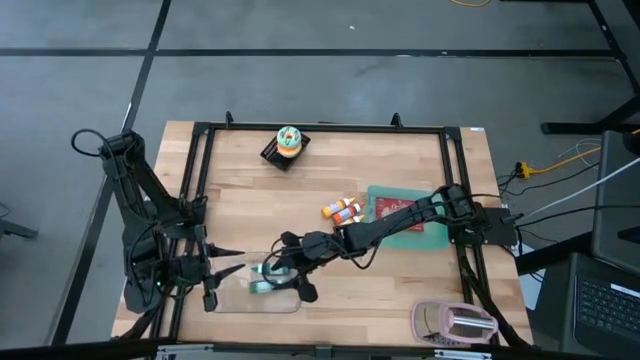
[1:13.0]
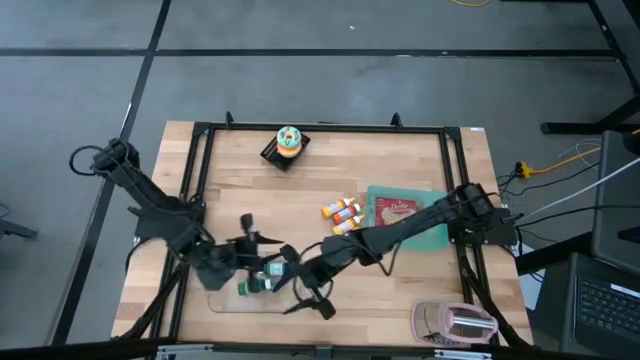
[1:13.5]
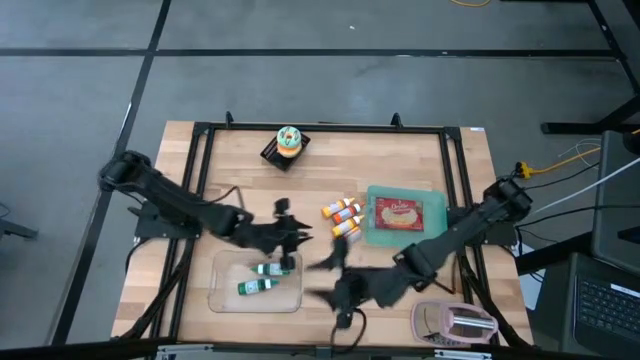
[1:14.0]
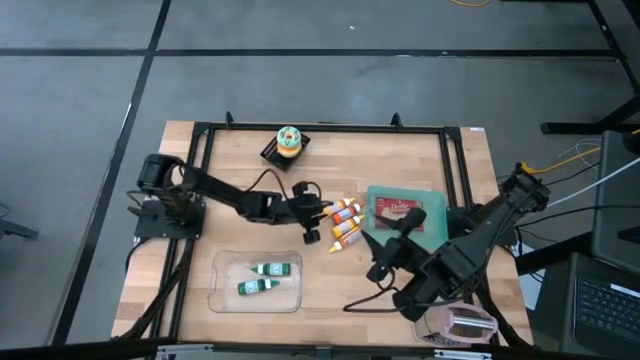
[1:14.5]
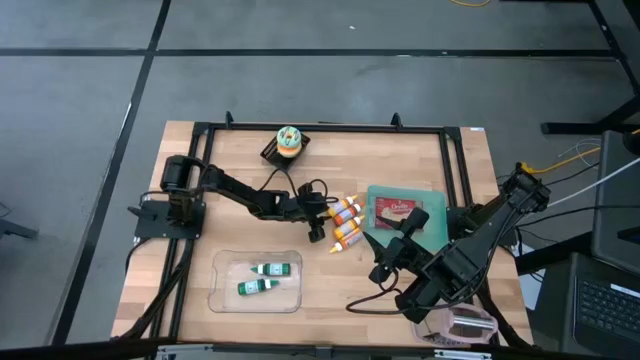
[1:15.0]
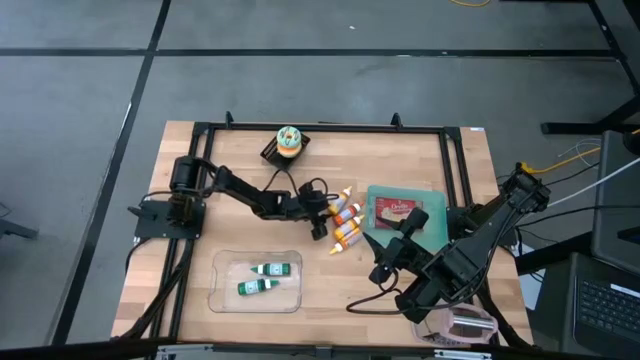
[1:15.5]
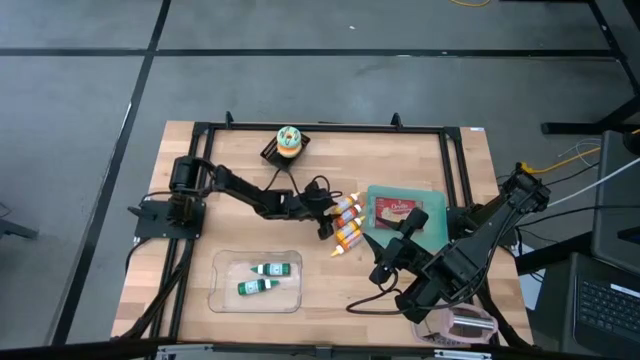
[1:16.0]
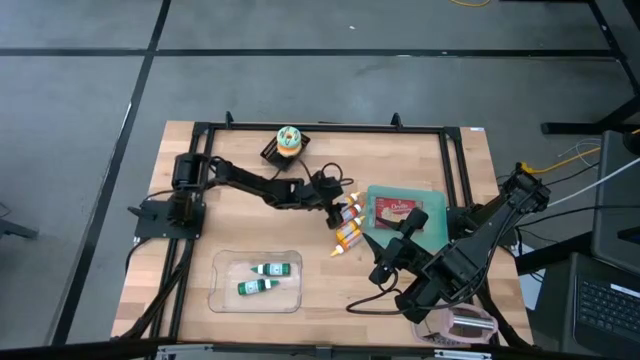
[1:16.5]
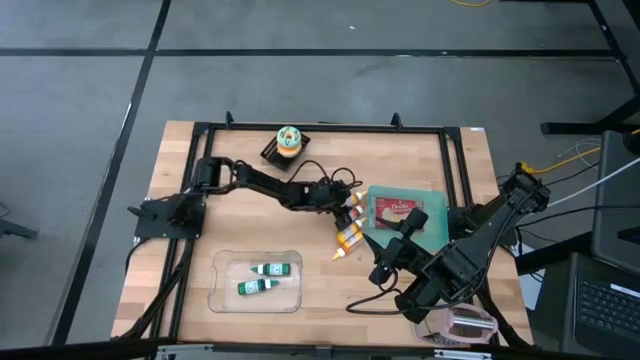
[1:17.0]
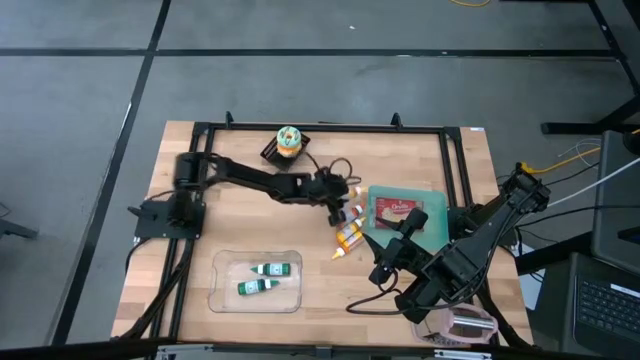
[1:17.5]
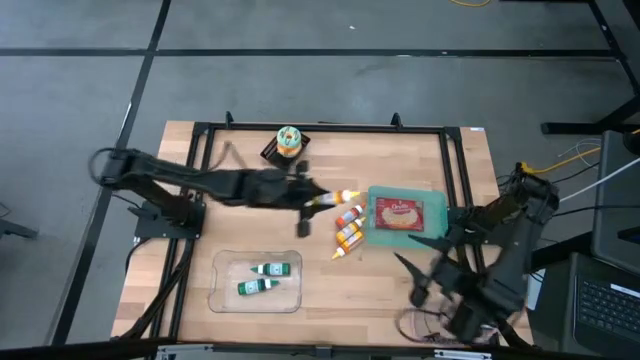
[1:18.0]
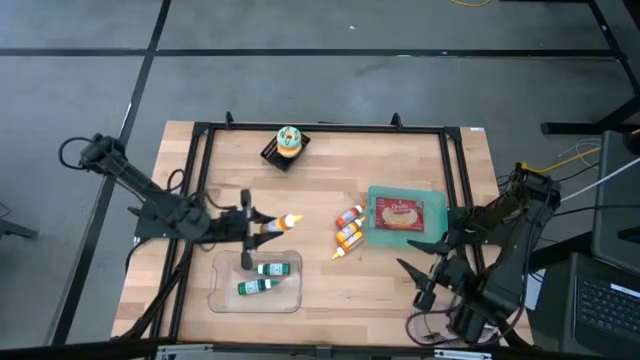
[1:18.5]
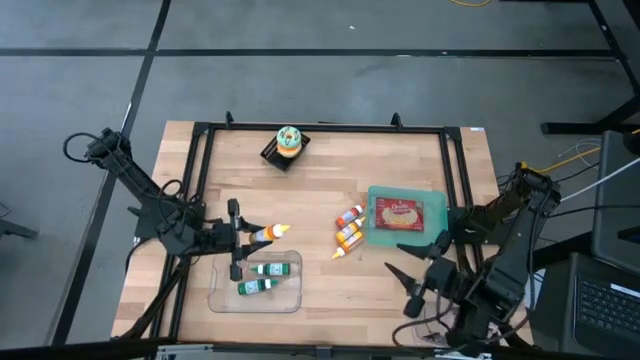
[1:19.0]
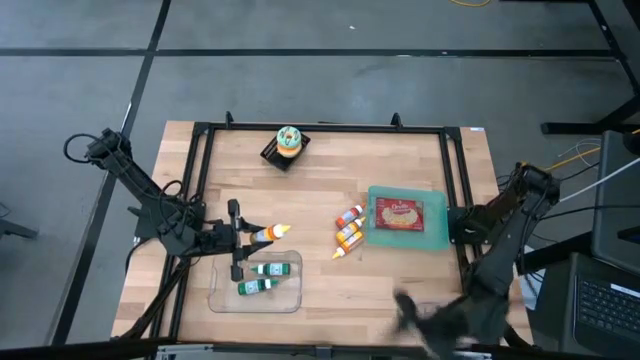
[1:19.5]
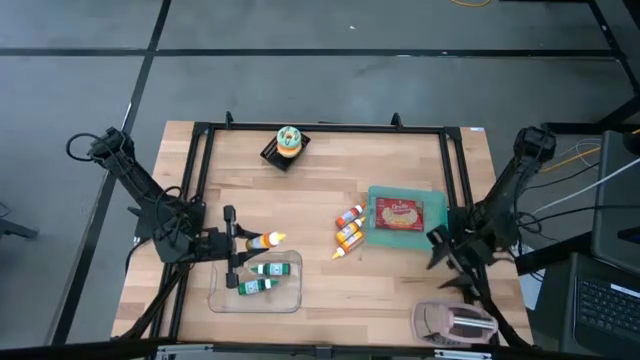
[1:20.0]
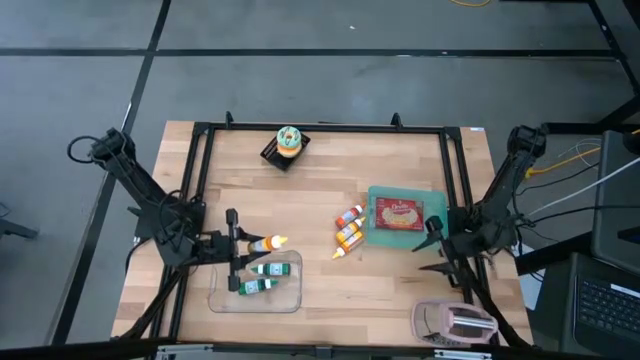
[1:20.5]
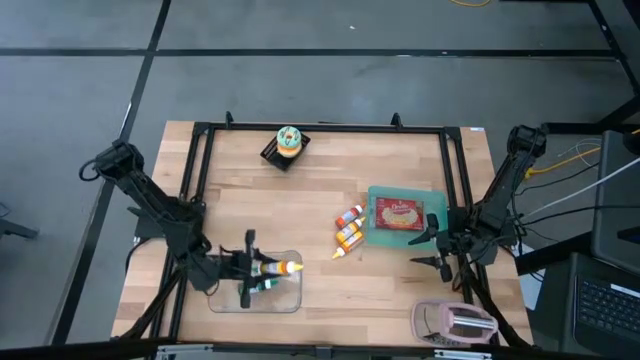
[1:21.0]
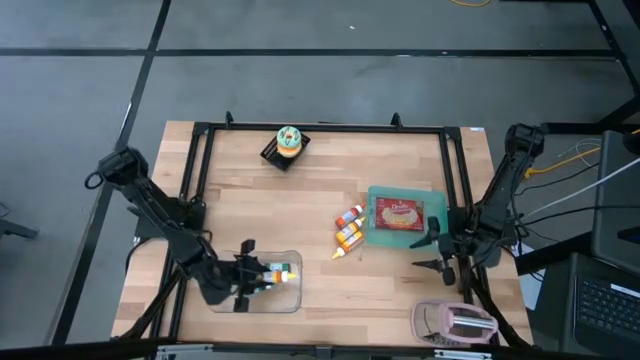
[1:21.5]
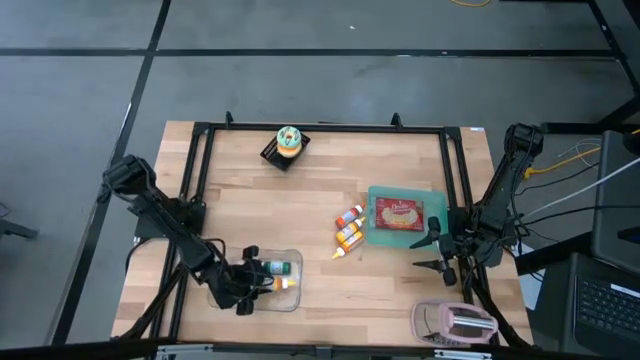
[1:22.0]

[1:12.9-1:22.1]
Put the top yellow food coloring bottle into the transparent bin

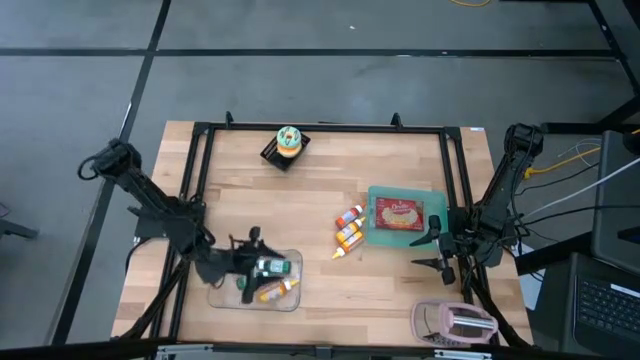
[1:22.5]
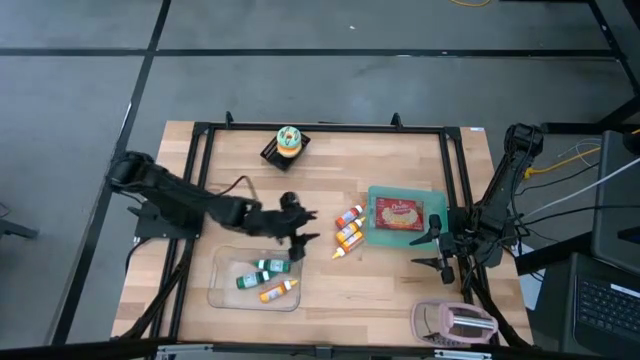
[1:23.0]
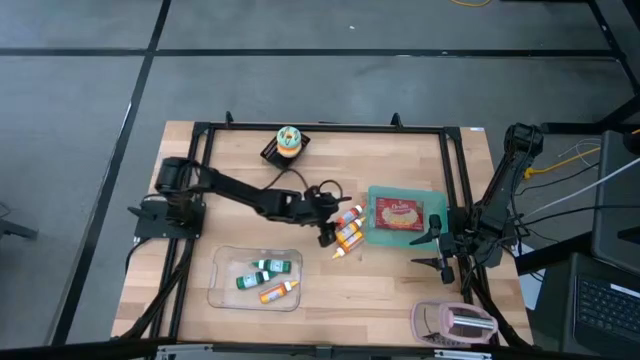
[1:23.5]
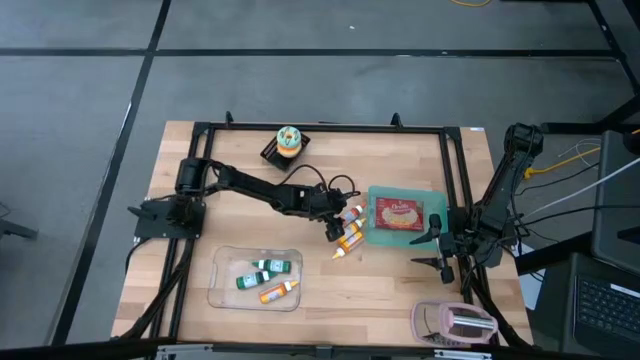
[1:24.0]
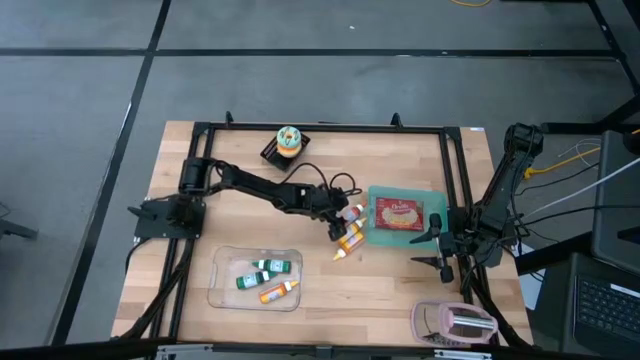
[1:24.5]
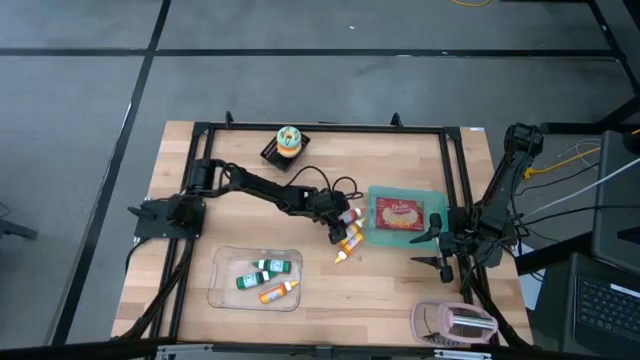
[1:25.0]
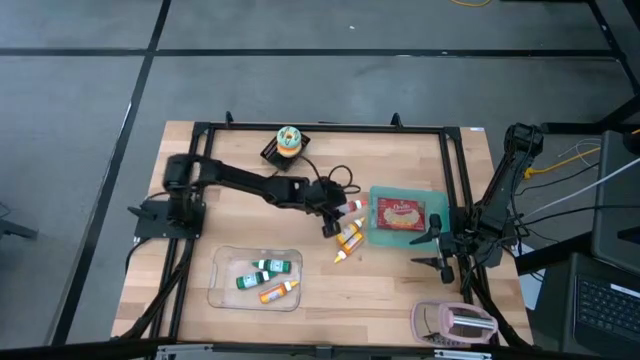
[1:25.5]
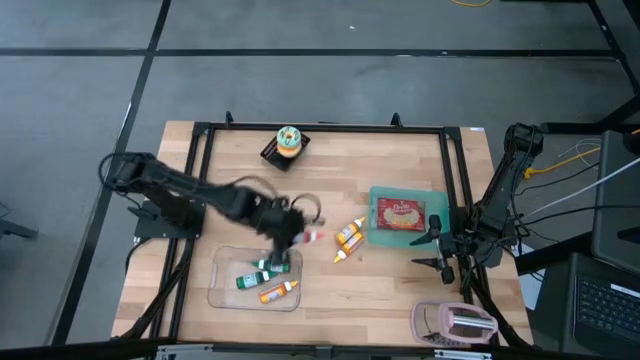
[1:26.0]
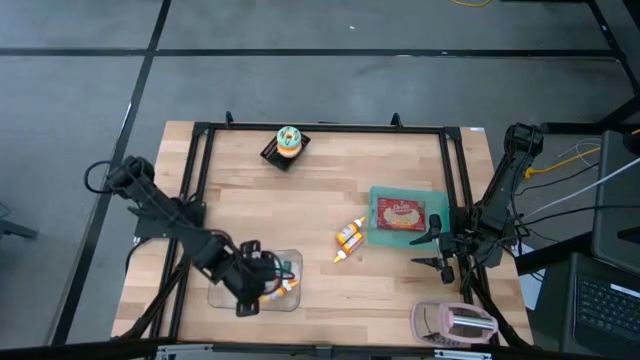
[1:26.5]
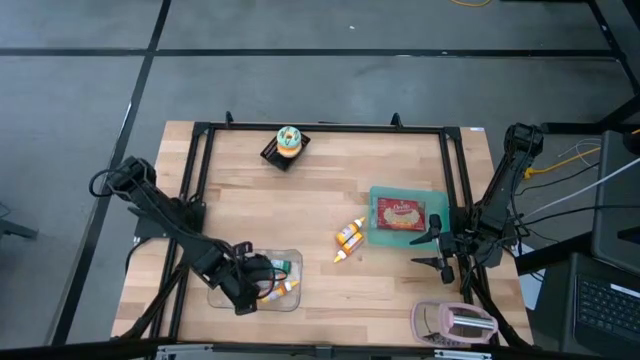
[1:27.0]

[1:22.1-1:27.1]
Put the orange food coloring bottle into the transparent bin

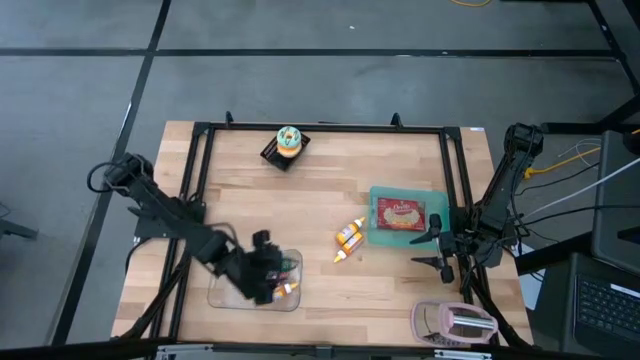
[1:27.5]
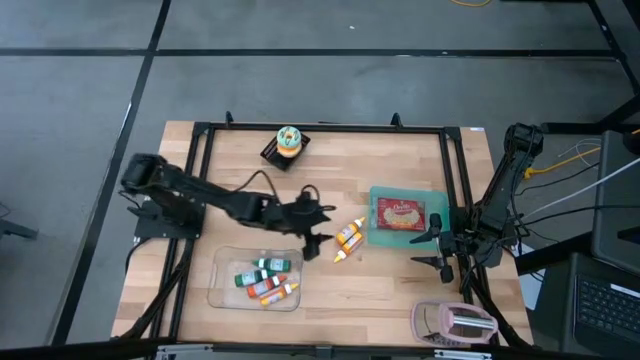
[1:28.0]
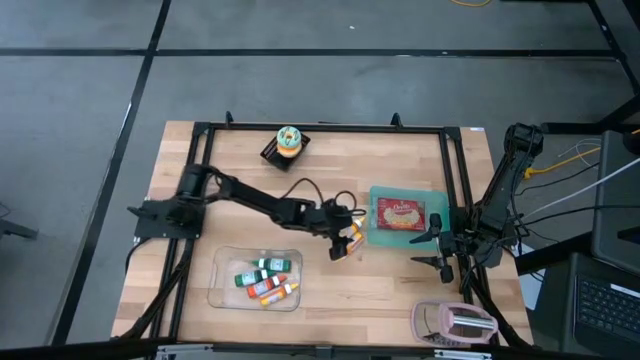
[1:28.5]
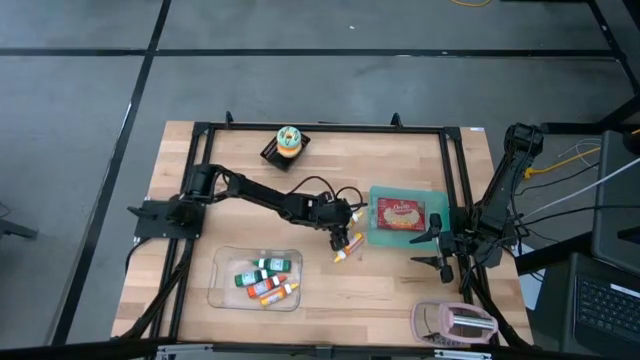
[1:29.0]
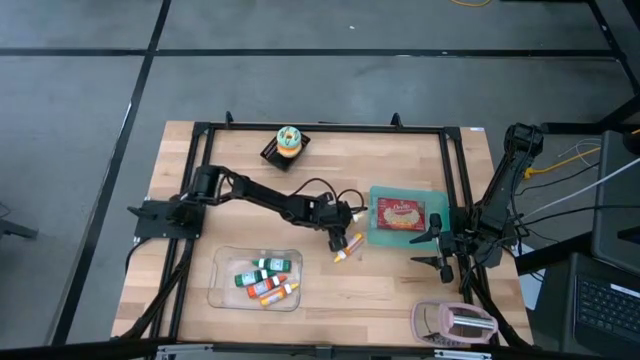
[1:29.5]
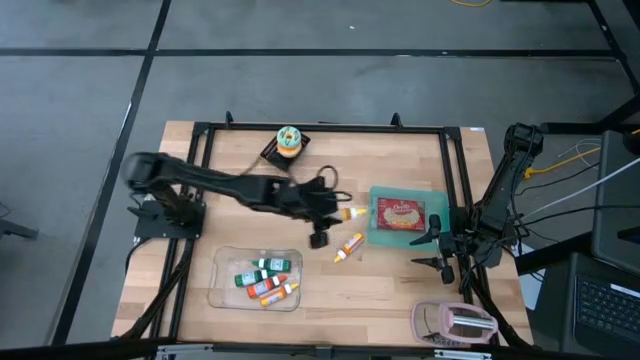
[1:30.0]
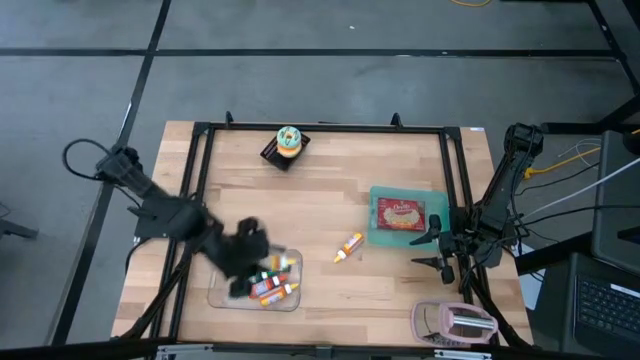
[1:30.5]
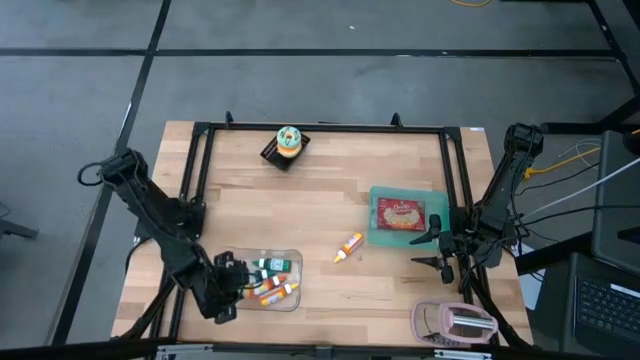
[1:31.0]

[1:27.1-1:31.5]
Put the top yellow food coloring bottle into the transparent bin

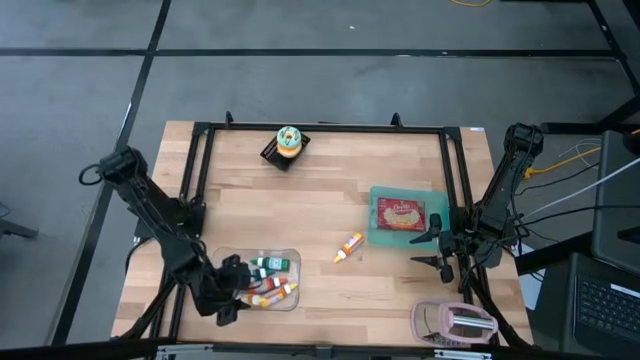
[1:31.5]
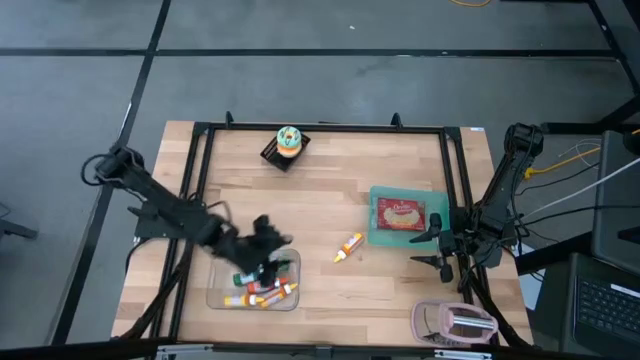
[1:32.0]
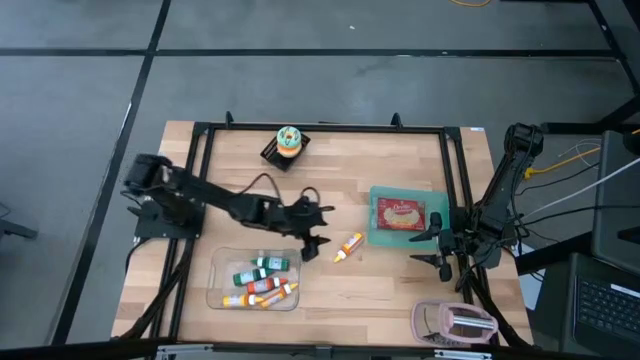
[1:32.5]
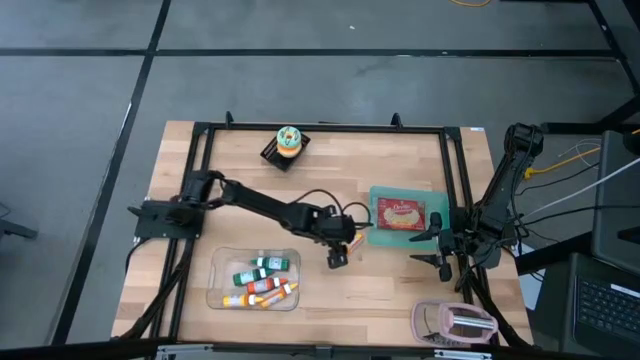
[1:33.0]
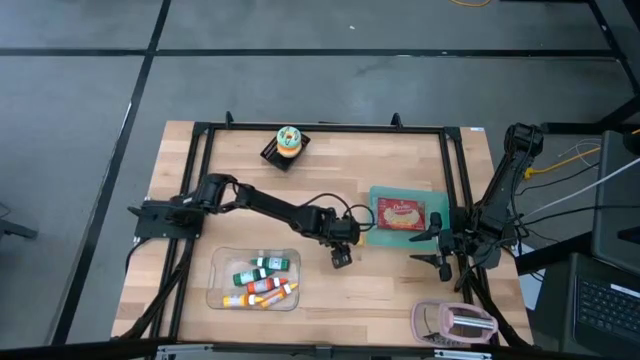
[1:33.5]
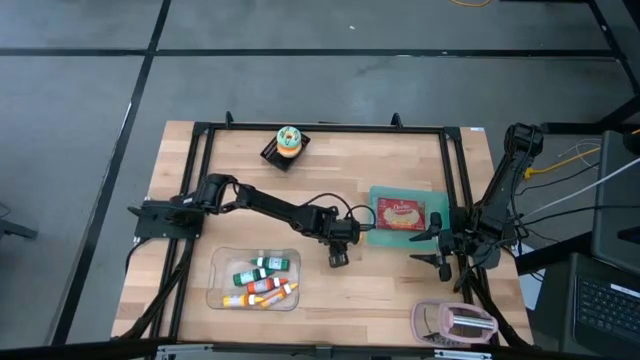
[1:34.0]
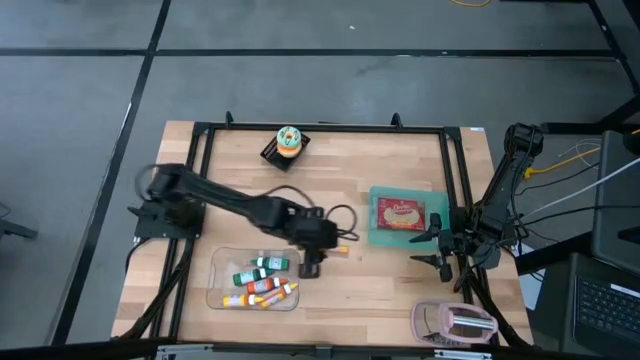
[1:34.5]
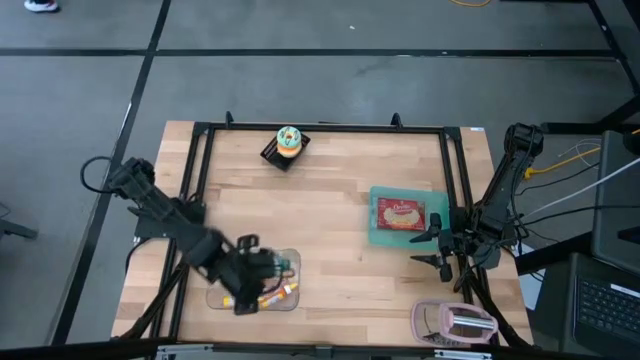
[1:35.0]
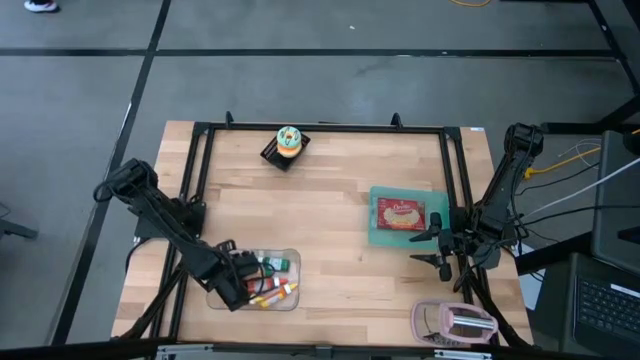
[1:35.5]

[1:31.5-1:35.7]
Put the yellow food coloring bottle into the transparent bin
